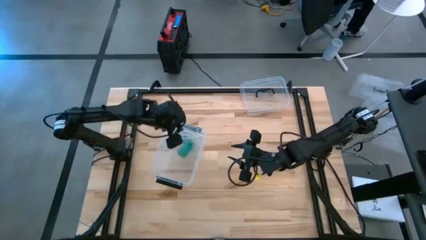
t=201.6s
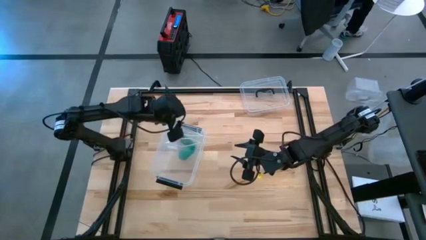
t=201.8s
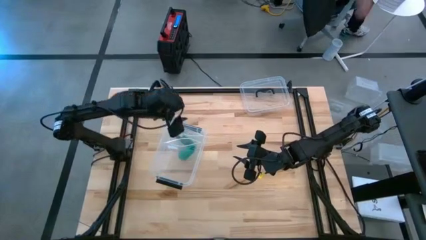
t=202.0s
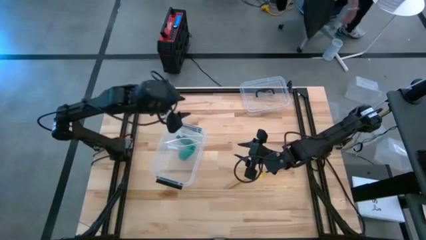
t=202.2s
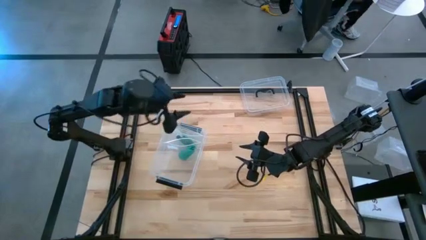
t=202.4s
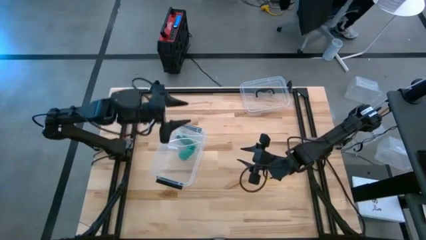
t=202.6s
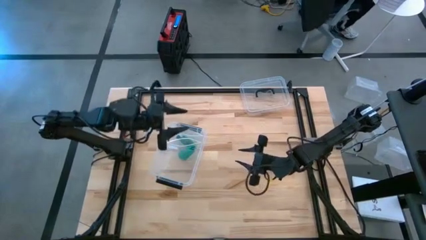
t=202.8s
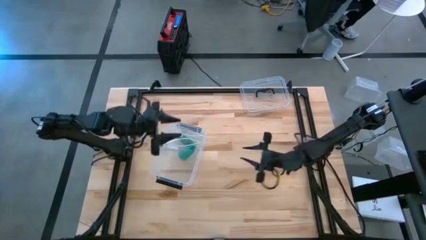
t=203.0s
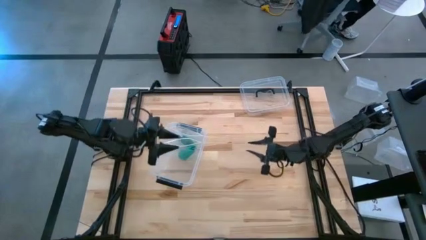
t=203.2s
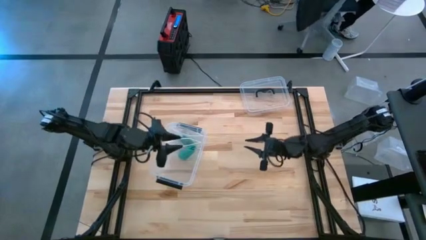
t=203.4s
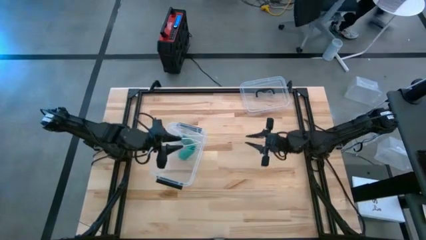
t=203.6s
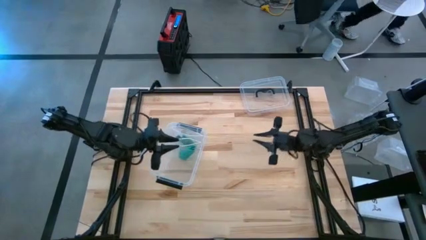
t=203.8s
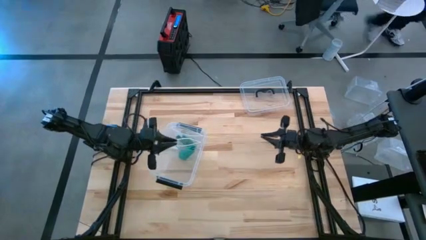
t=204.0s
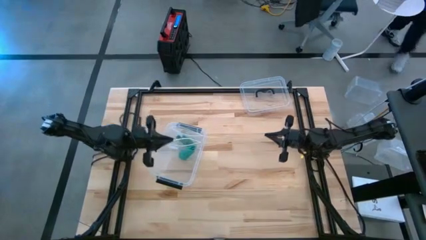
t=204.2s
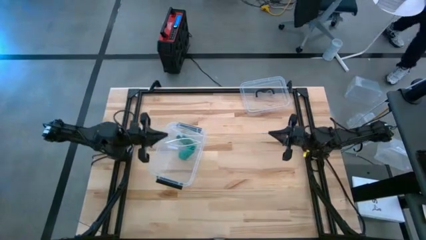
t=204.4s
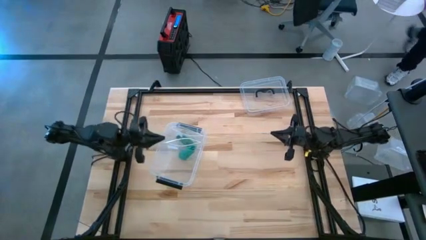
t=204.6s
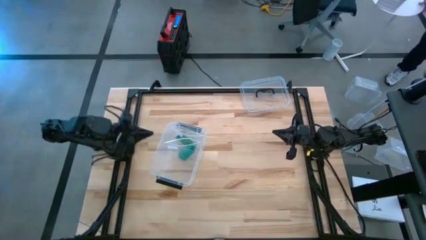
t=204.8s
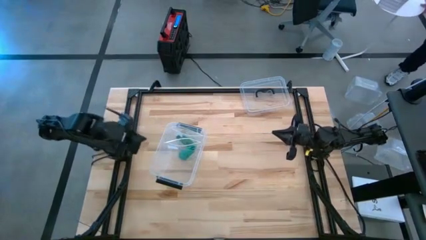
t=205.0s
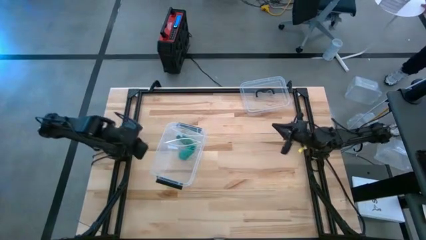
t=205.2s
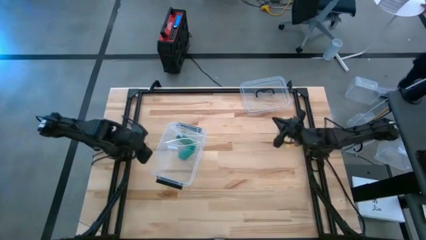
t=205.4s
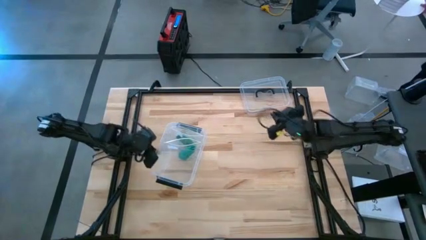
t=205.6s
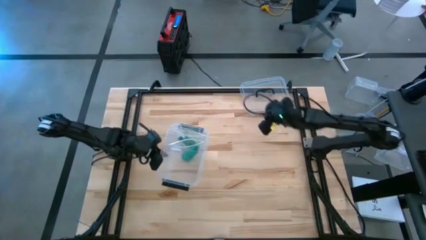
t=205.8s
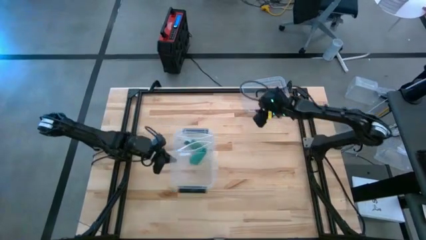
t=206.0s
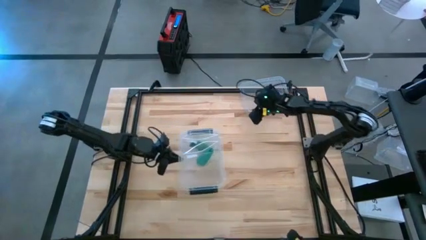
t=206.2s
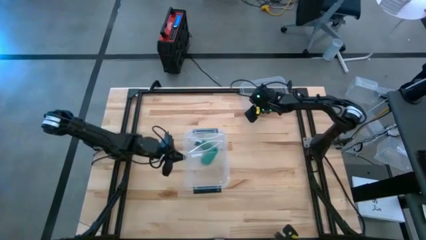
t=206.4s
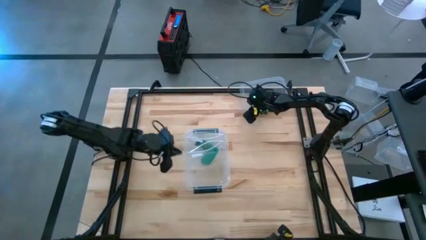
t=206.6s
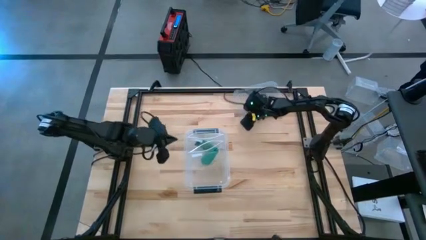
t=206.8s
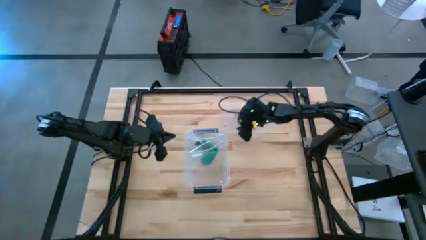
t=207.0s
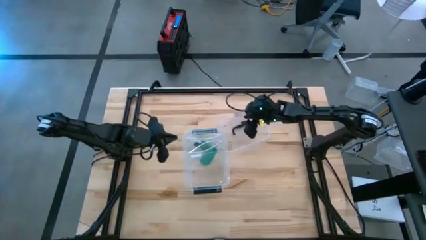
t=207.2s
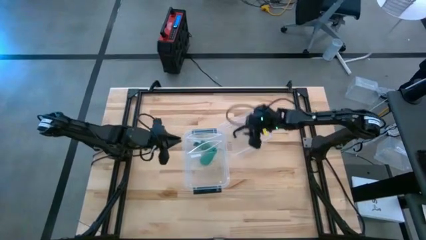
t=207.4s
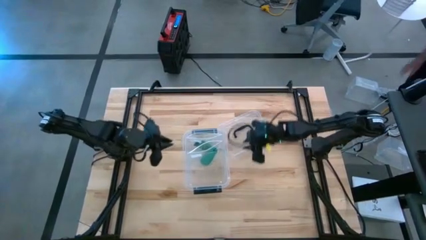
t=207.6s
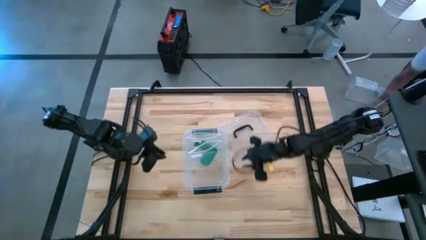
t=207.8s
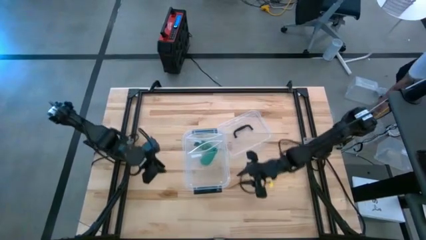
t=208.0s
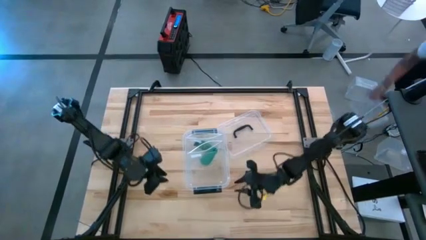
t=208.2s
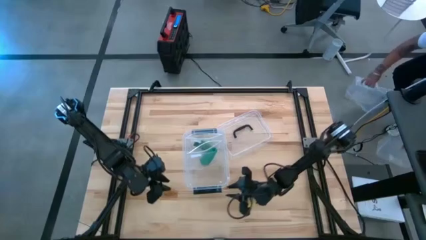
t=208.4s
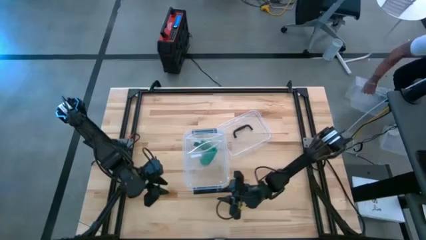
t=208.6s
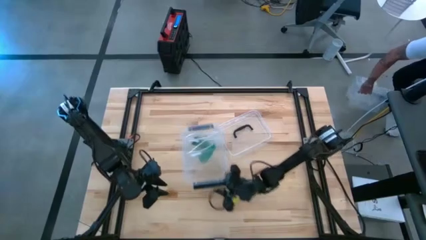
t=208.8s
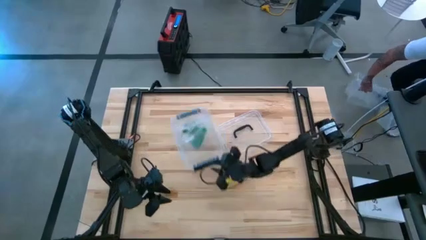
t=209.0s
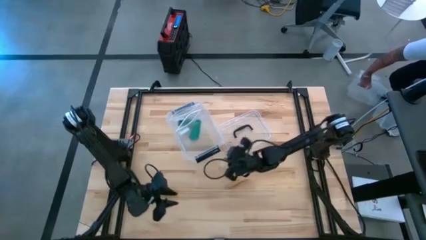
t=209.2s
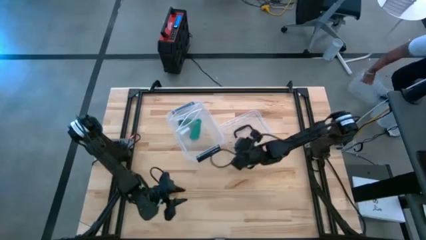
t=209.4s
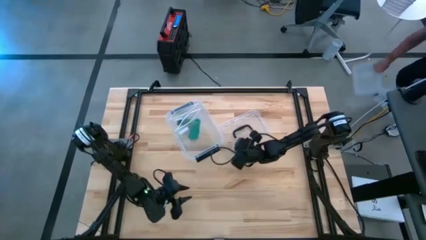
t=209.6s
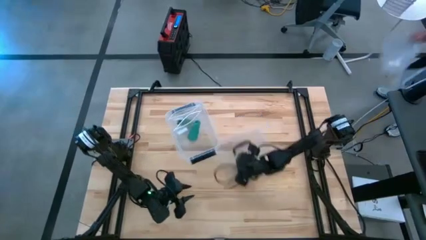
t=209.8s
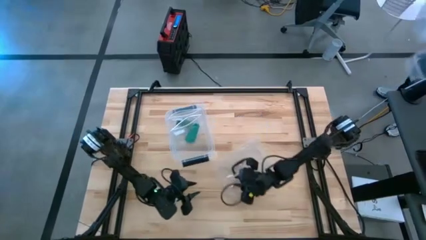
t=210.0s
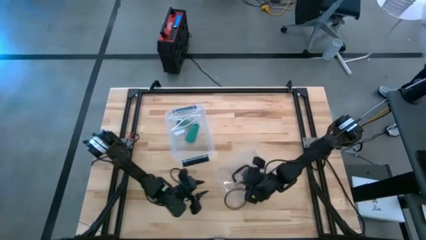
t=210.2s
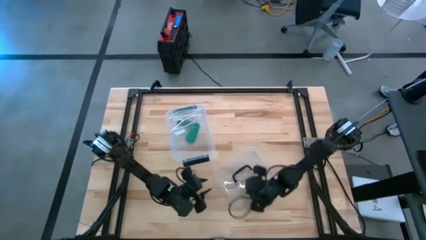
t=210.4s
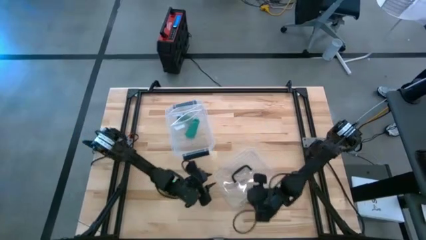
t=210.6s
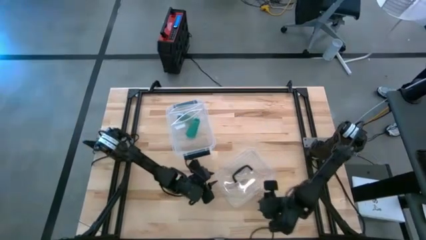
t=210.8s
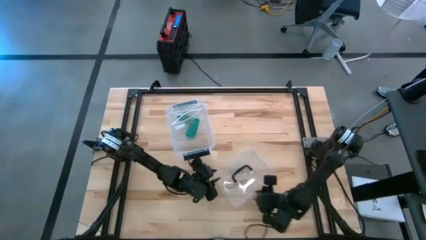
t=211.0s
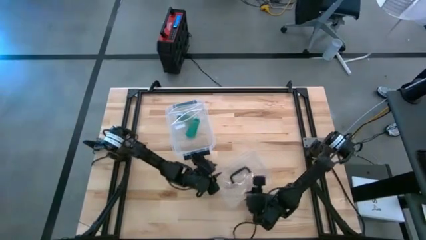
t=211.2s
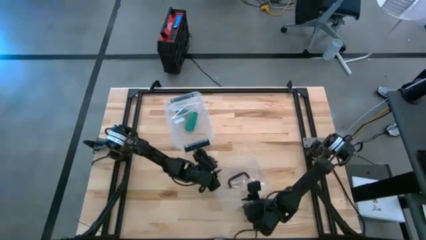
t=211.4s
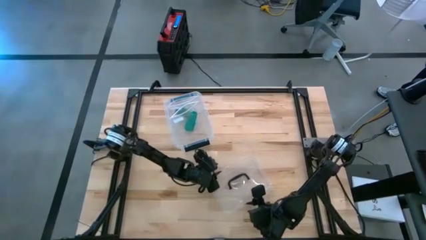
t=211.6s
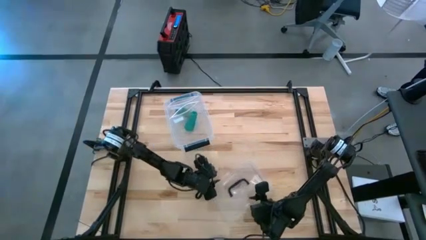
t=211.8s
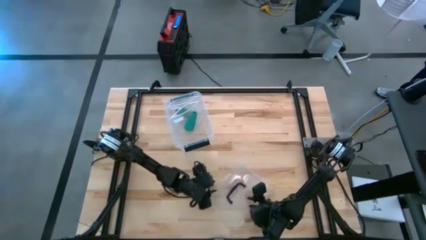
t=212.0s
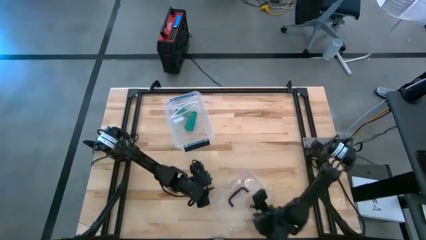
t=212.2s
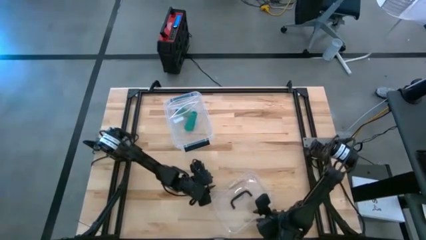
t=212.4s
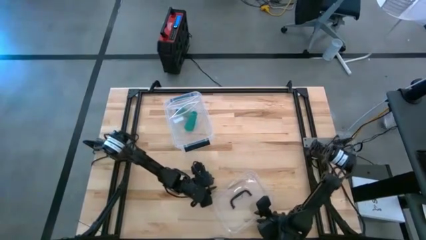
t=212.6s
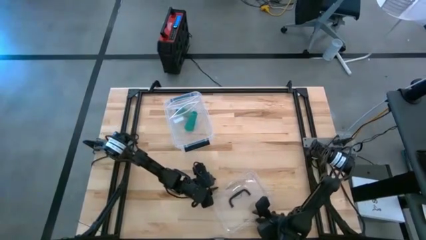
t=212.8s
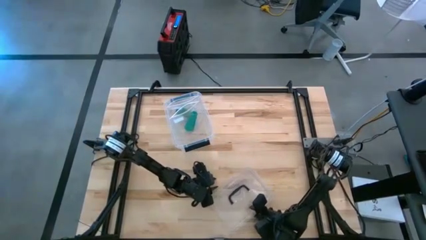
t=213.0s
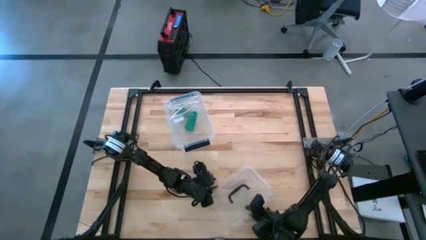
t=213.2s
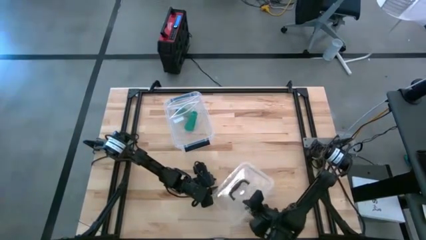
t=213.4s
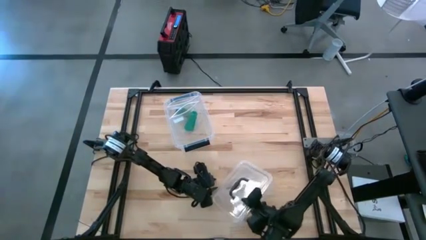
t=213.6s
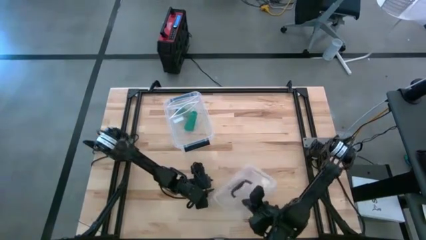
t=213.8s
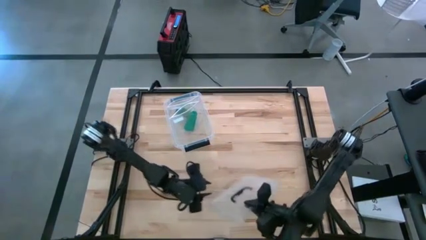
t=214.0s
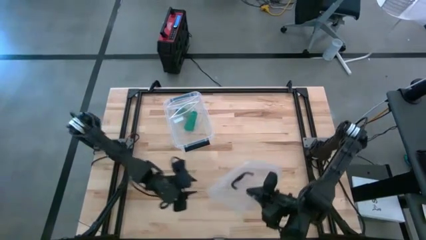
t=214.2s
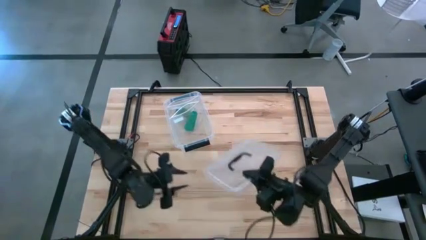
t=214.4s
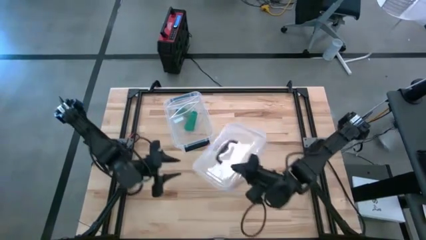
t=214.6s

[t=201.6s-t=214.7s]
Task: Roll bandage
Close the transparent bin

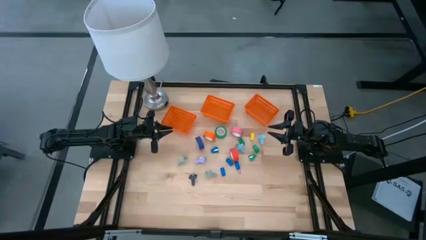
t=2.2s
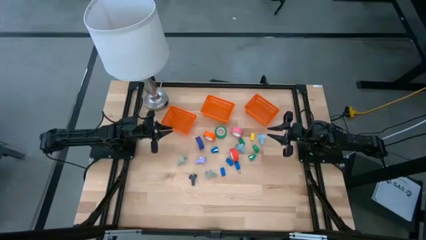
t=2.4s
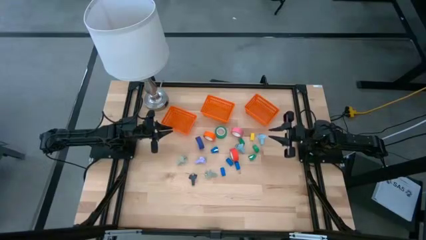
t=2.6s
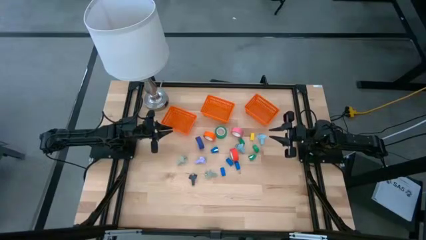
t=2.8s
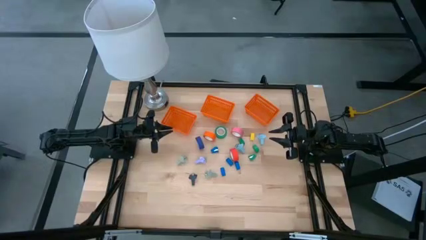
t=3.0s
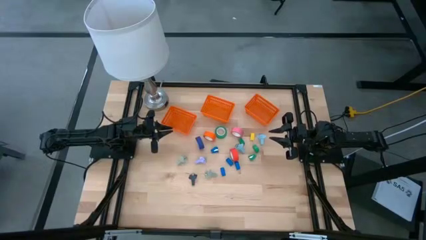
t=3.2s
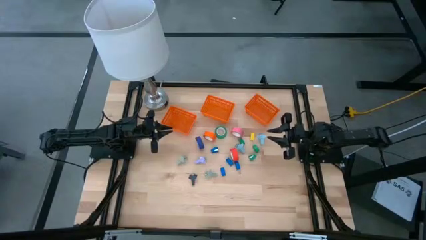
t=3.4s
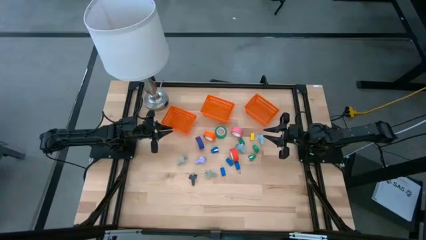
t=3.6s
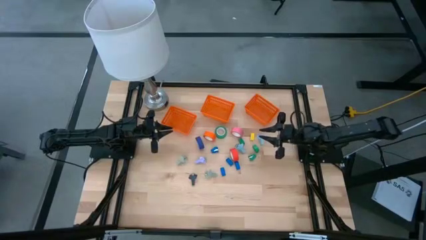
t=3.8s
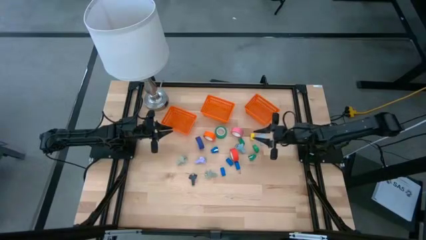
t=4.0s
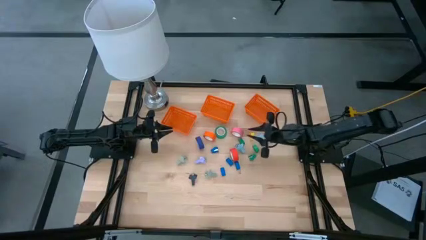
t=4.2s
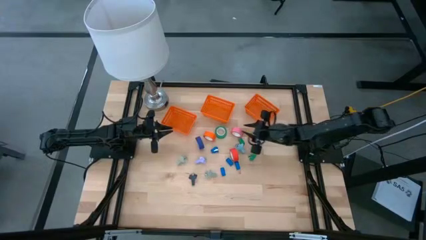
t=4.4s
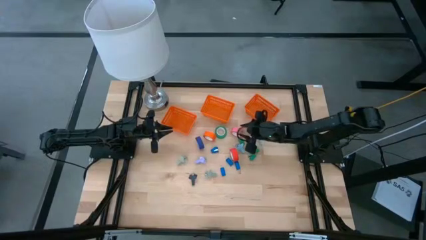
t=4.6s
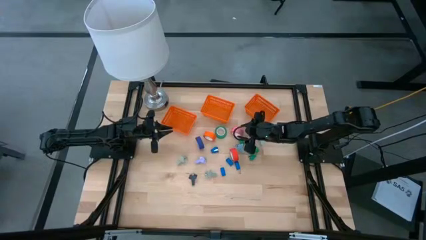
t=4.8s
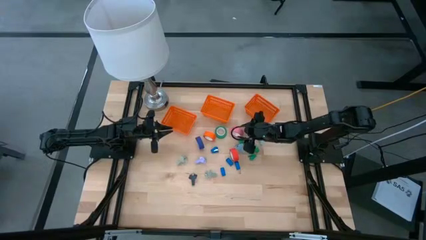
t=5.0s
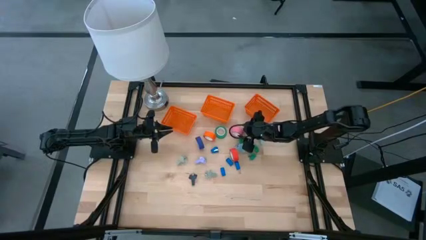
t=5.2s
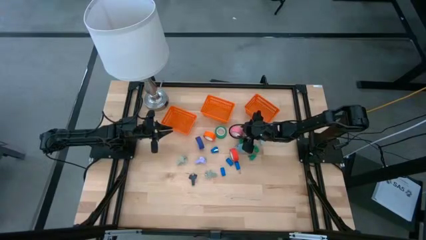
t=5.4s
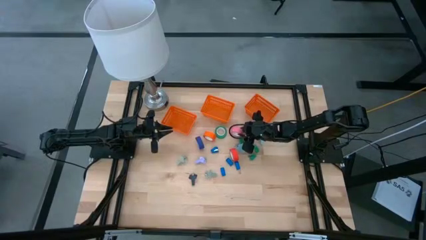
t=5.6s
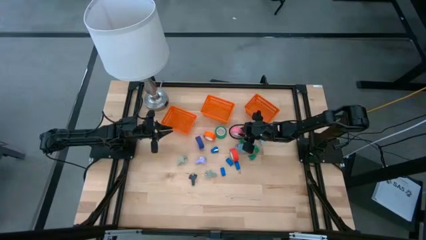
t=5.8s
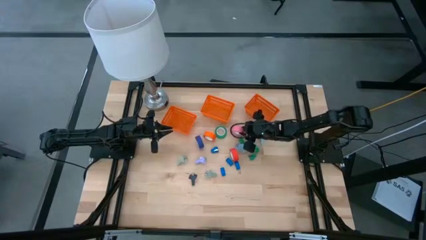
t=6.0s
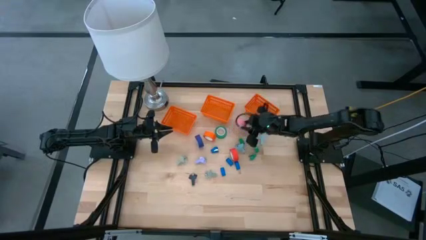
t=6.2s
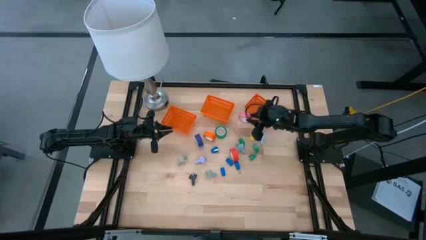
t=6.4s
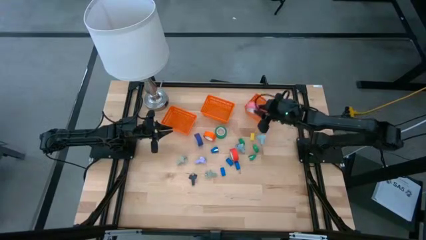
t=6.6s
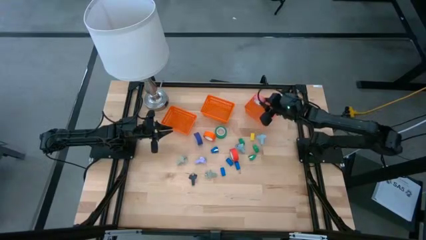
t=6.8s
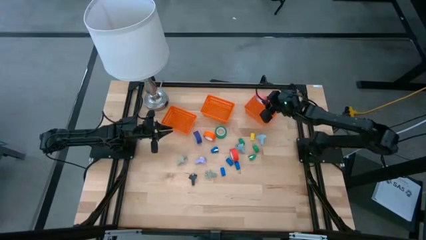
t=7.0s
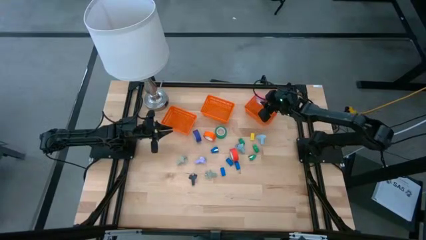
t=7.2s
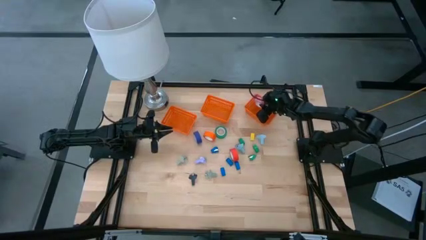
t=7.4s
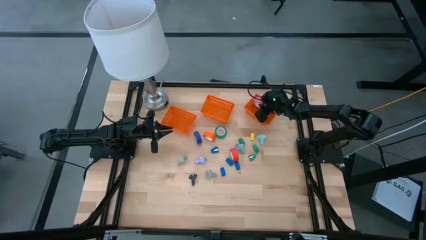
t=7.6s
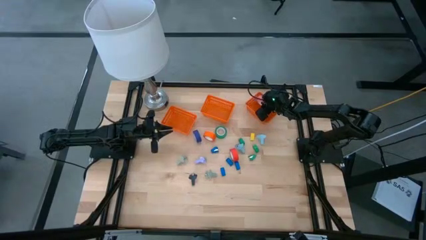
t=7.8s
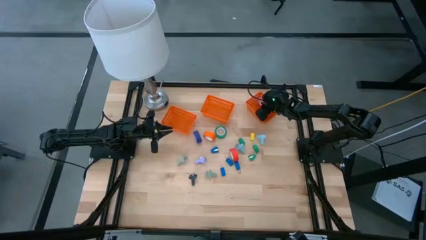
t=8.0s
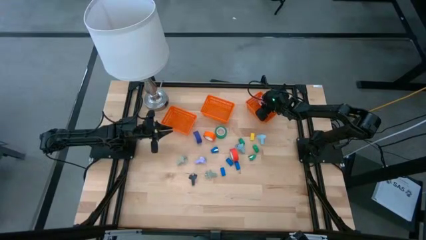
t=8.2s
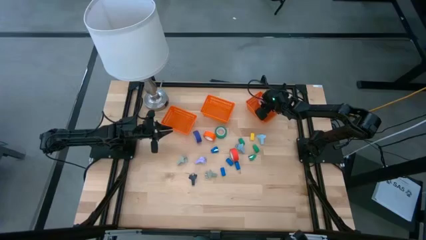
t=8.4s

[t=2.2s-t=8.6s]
Task: Pick and place Stapler, Stapler remover, tape
Put the pink tape into the right orange bin
